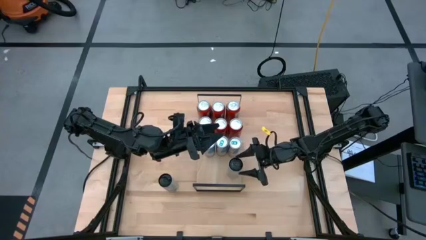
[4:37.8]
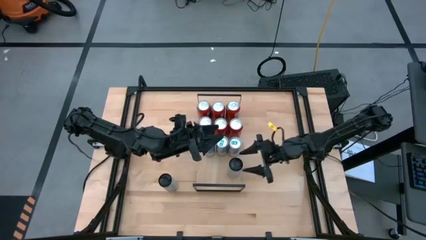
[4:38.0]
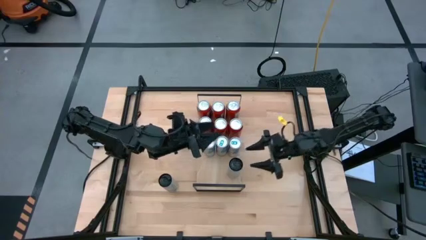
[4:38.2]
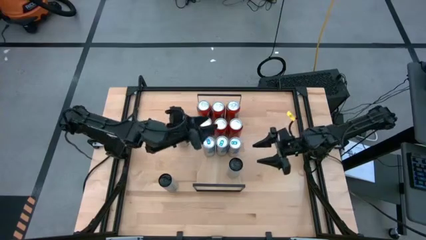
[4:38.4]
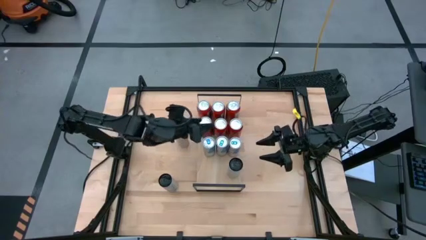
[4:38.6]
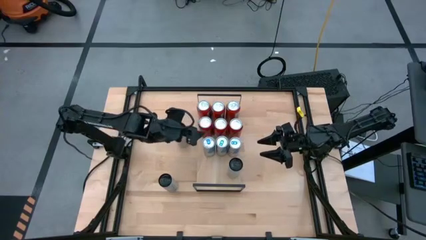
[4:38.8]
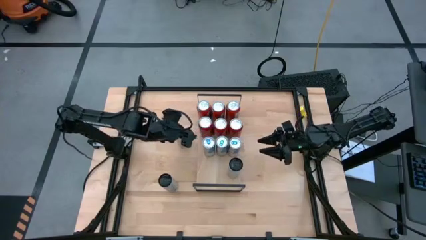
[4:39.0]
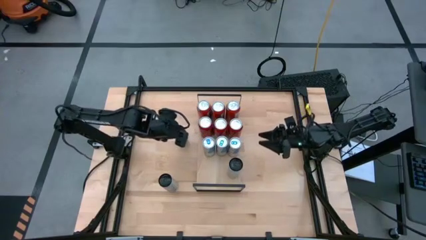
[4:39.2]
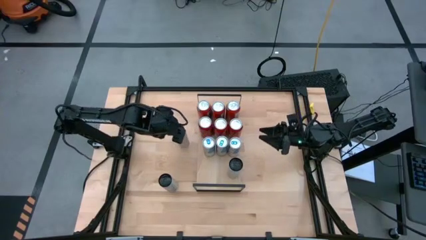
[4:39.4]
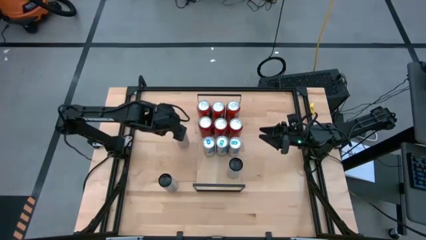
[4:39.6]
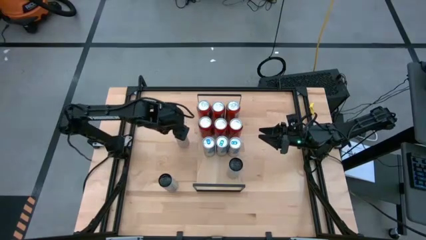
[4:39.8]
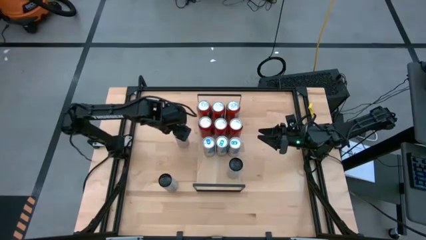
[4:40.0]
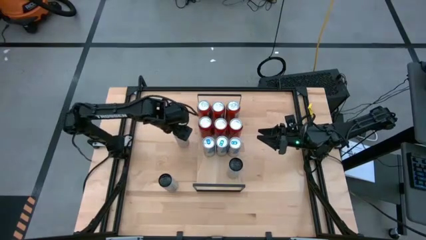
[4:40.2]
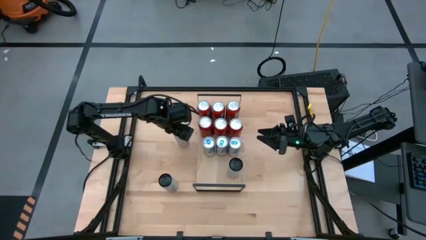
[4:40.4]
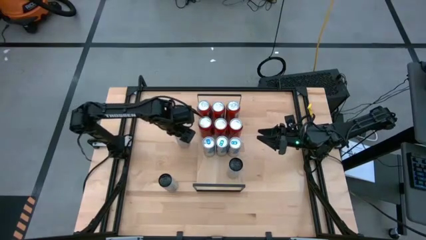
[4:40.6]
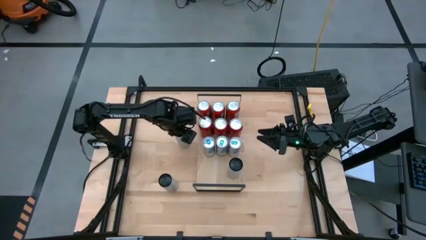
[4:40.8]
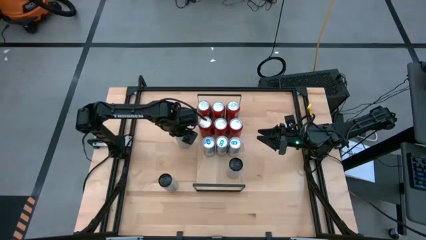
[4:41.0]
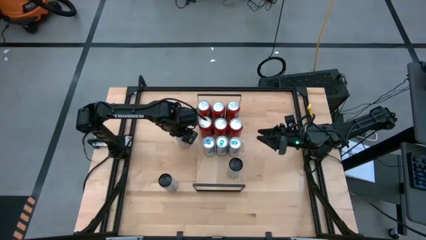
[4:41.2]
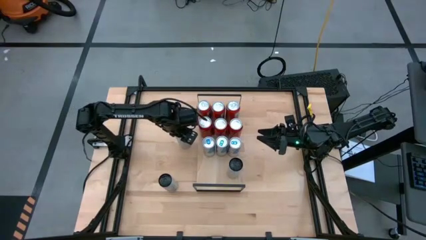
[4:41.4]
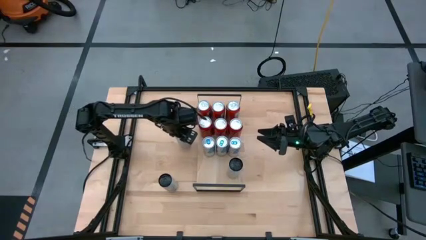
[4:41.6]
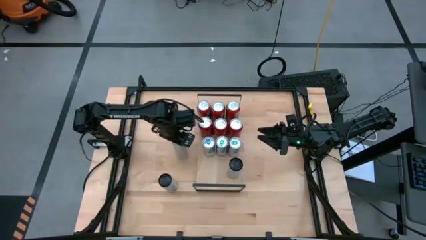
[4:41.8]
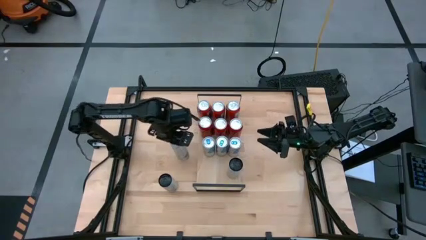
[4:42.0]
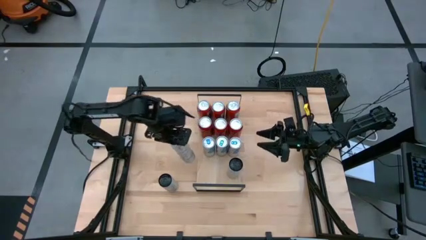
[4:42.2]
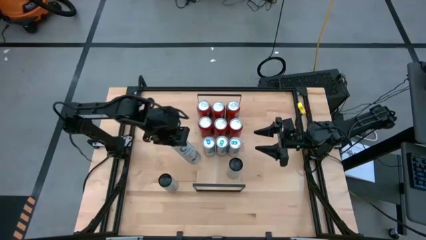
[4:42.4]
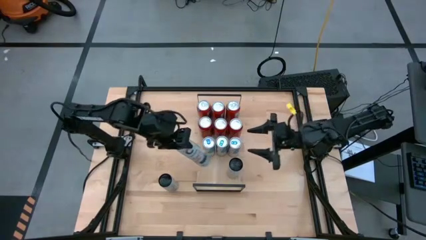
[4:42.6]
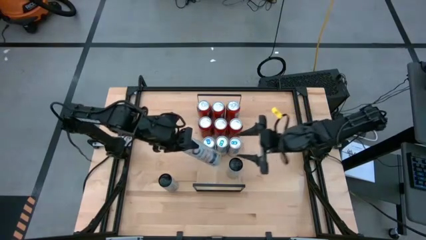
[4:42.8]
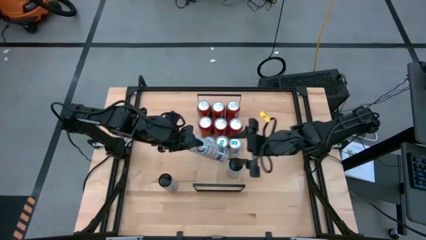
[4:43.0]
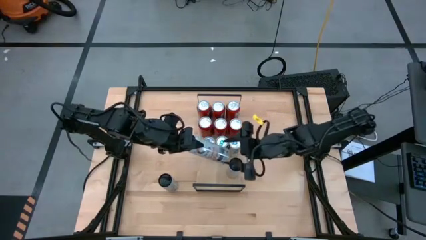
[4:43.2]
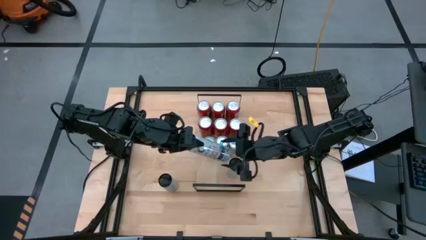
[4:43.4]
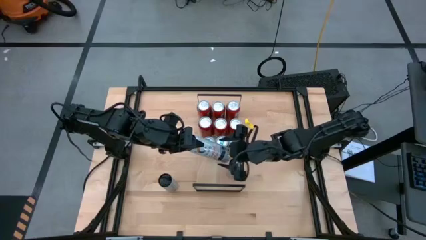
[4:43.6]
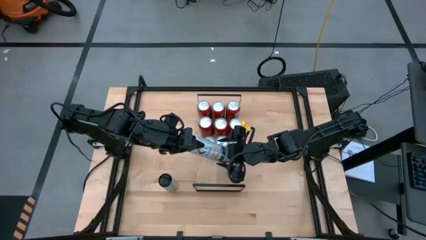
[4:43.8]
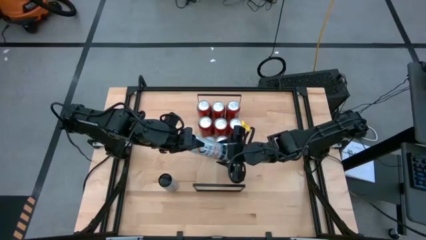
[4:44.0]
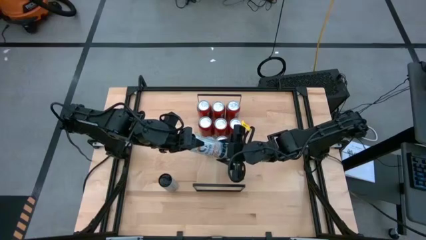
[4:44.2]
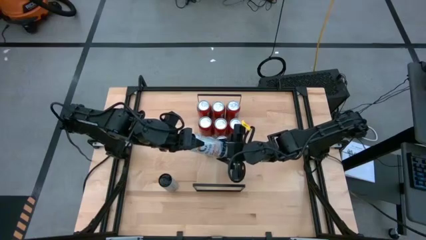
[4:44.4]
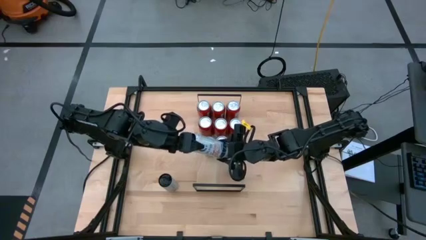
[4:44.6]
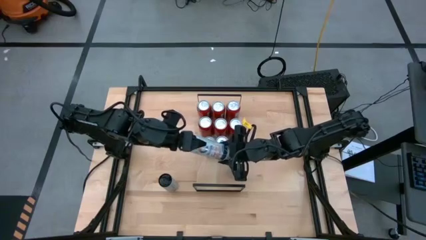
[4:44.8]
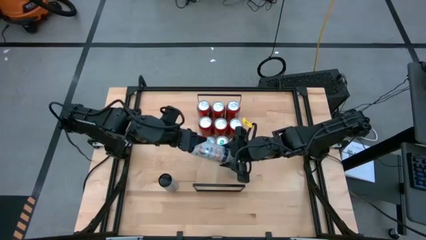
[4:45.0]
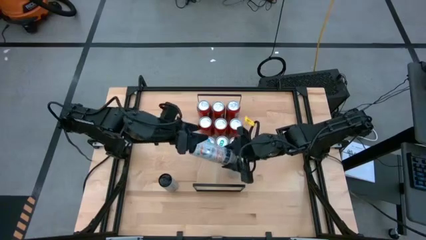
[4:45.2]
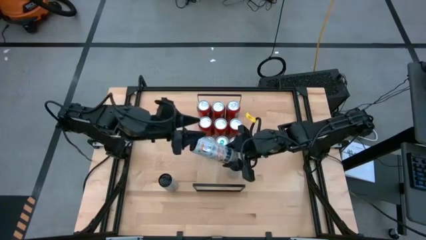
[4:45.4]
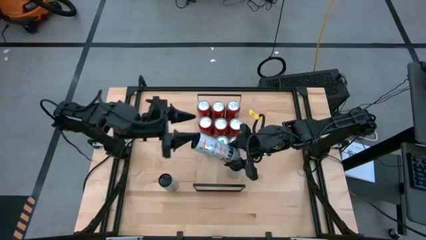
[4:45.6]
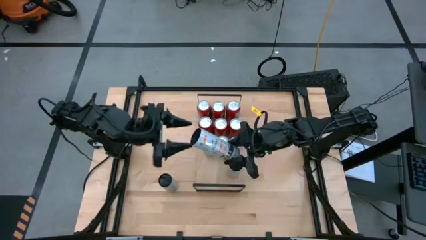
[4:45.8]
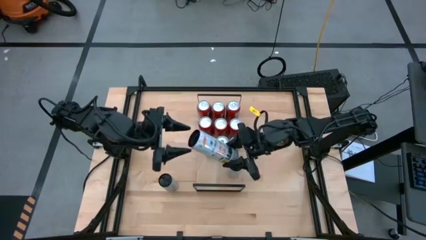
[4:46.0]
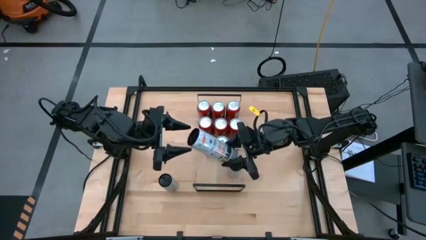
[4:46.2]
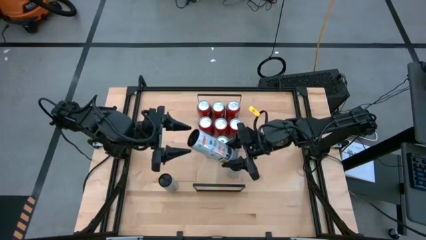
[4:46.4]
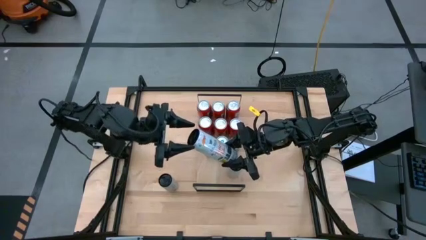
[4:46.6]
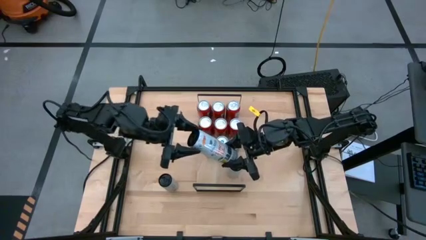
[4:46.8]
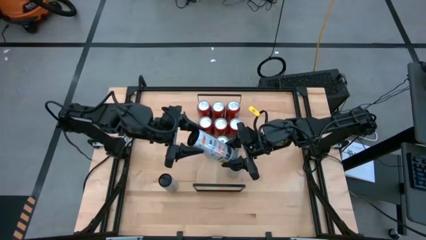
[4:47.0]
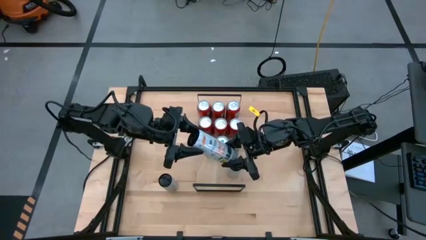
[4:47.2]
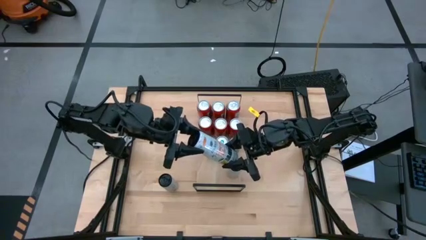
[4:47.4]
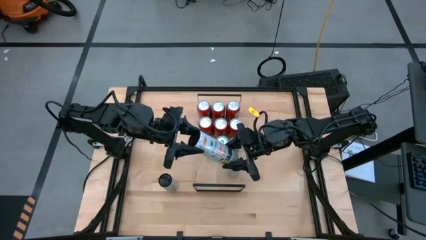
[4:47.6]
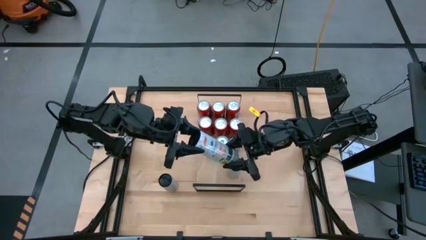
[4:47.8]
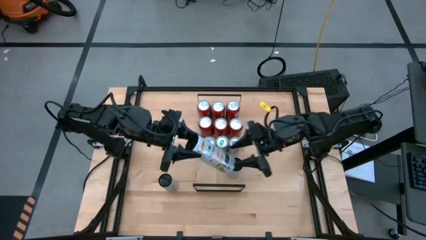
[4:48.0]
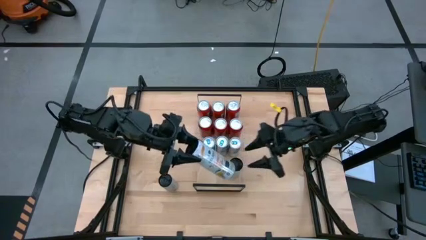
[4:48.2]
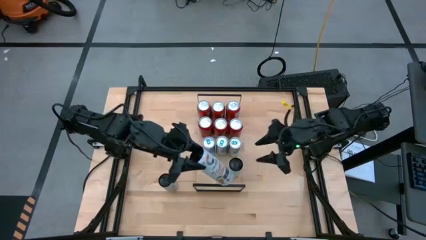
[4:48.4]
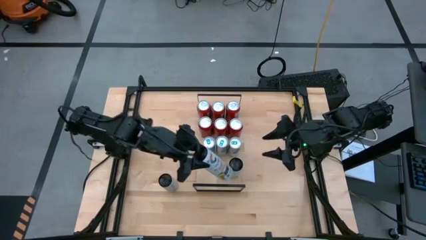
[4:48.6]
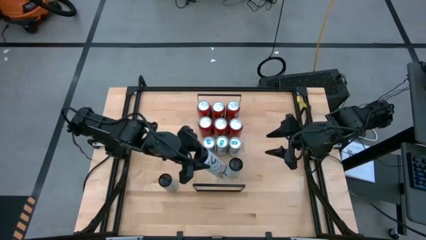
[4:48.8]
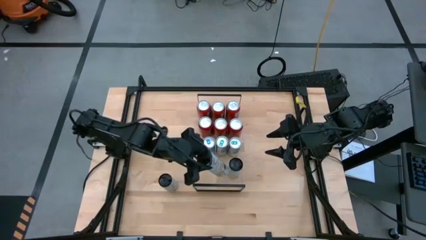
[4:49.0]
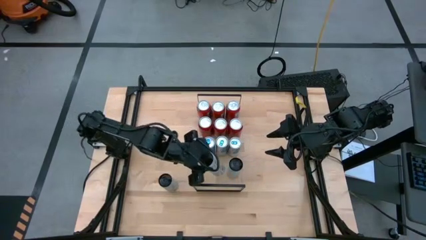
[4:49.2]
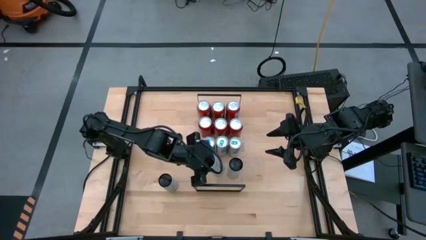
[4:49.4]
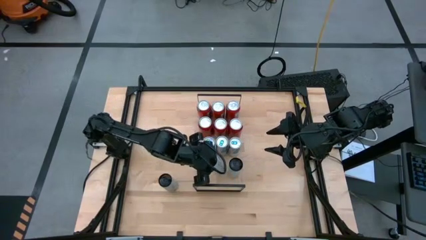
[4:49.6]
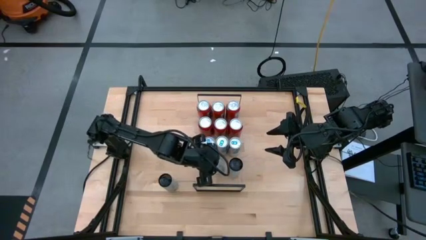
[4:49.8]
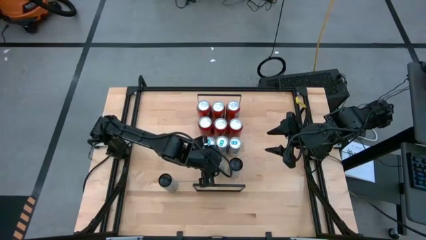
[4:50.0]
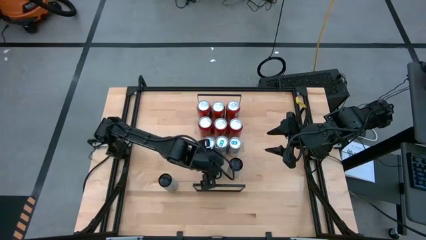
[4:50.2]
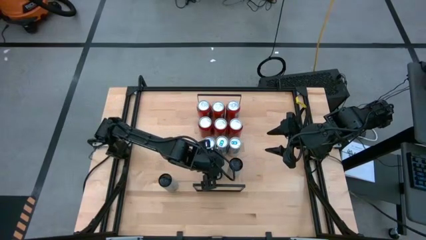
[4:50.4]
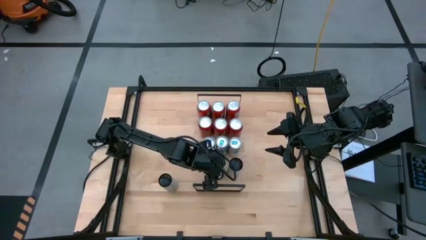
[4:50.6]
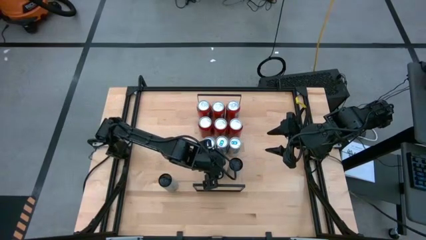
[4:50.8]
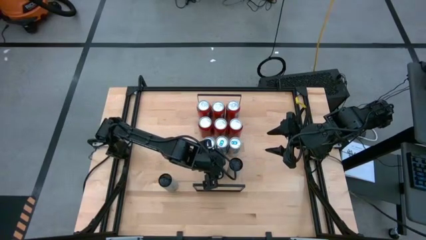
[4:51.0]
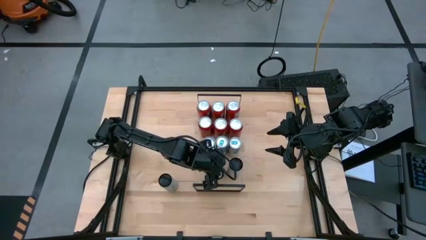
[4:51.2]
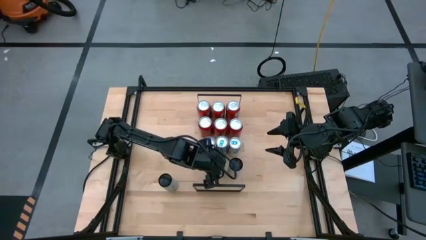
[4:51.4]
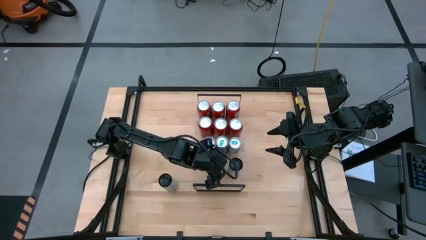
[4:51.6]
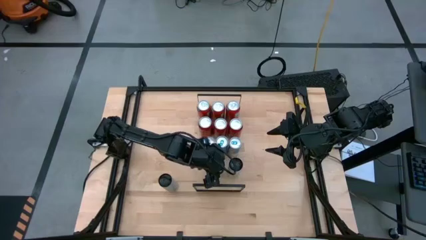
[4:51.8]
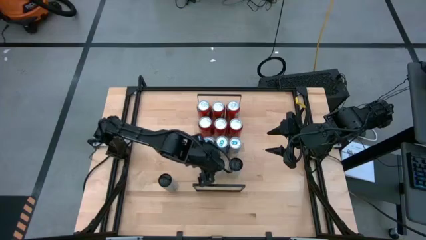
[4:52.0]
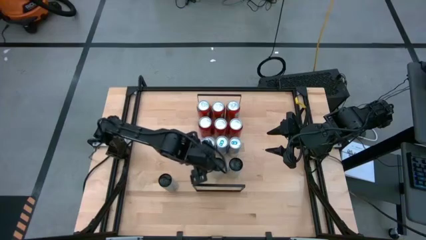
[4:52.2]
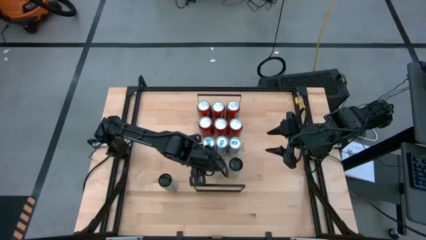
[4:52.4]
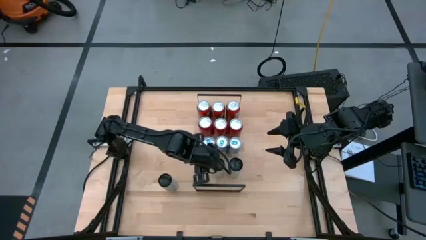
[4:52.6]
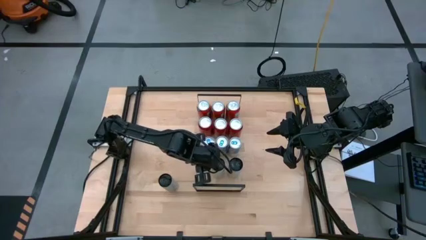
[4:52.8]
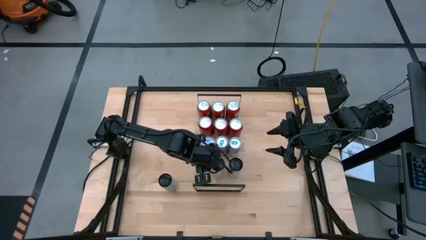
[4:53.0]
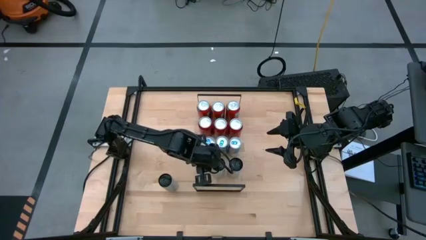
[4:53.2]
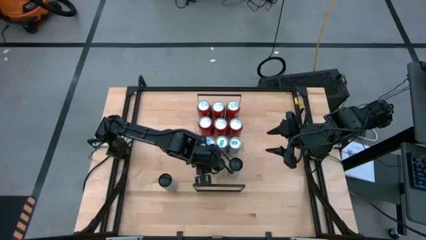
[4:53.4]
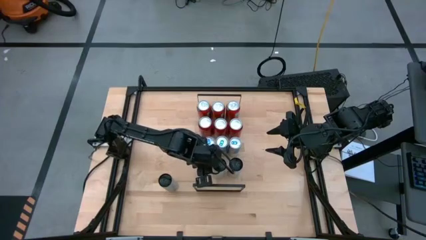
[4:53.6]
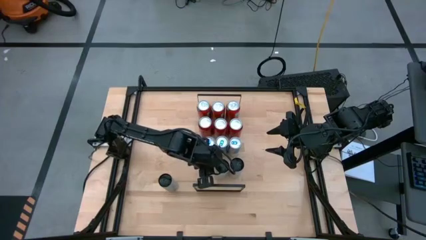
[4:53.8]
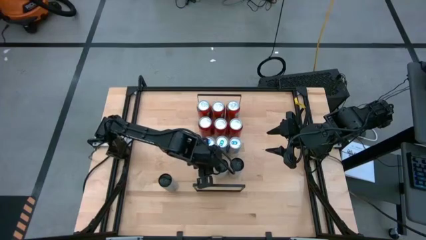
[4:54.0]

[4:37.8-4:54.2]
Task: Place canned beverage on shelf
Put the top white yellow soda can on the shelf aligned with the other white yellow soda can

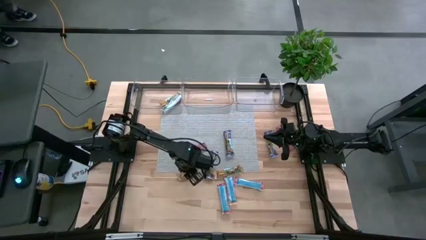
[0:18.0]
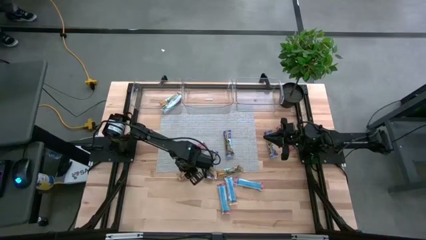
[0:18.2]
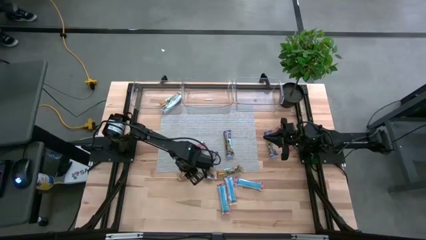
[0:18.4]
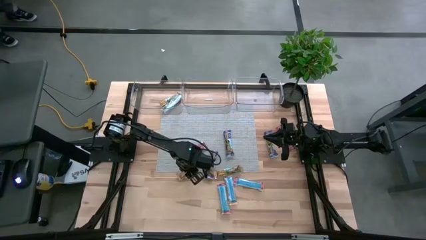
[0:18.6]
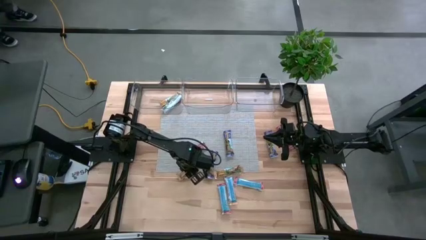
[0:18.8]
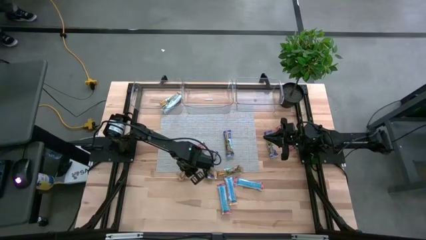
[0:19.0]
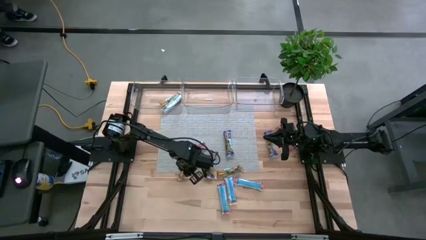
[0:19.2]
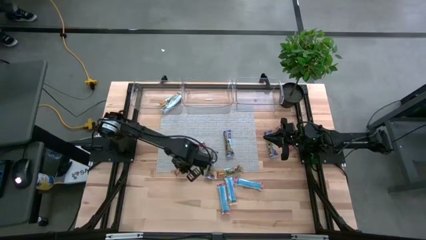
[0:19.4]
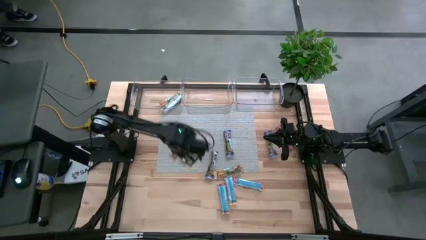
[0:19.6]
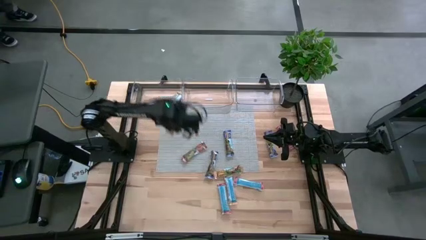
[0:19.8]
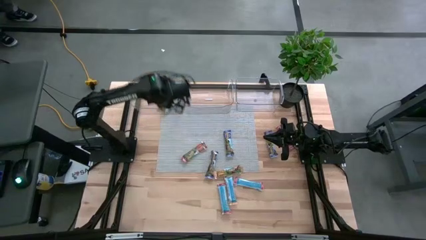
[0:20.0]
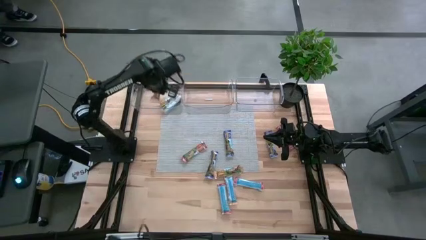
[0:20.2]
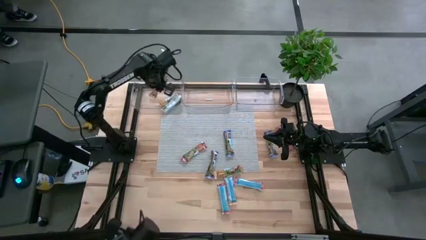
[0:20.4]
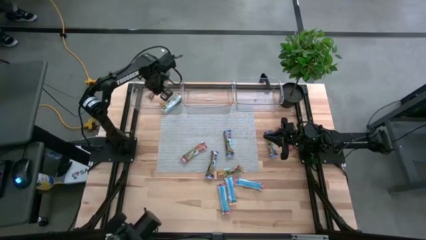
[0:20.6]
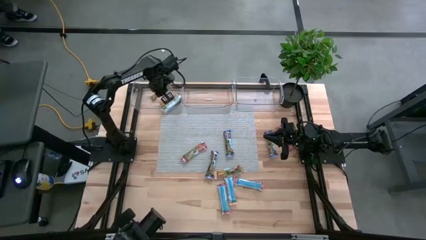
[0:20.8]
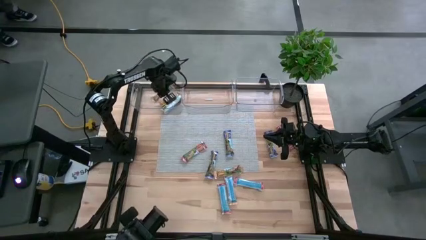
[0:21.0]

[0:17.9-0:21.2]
Task: Pick and place Granola Bars by type
Put the yellow granola bar into the left transparent bin
